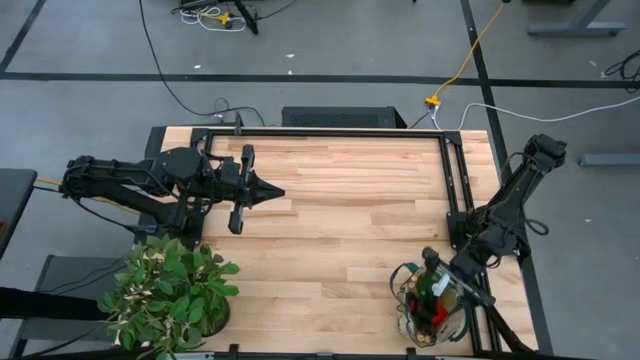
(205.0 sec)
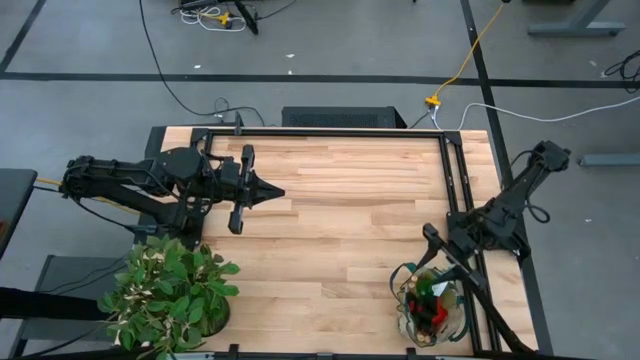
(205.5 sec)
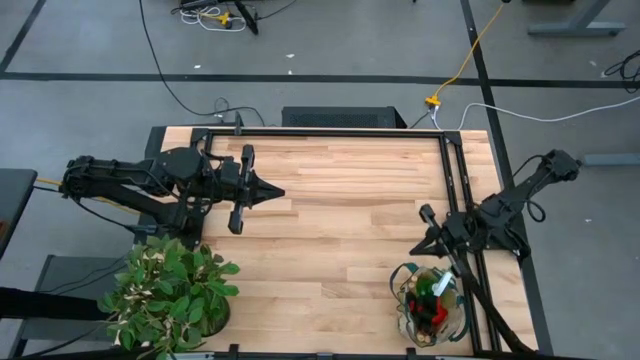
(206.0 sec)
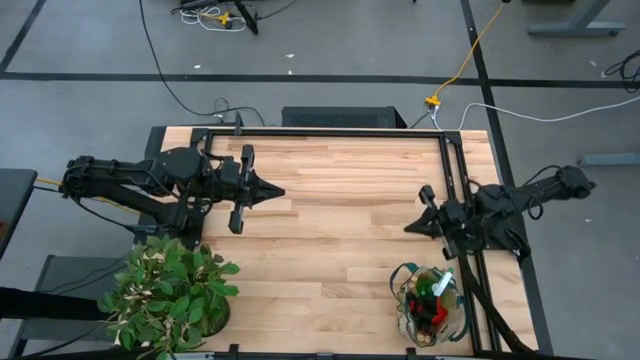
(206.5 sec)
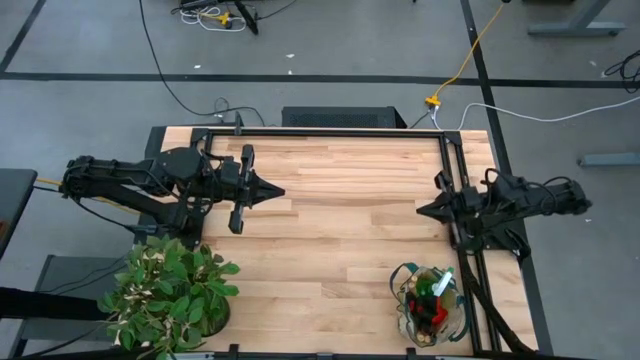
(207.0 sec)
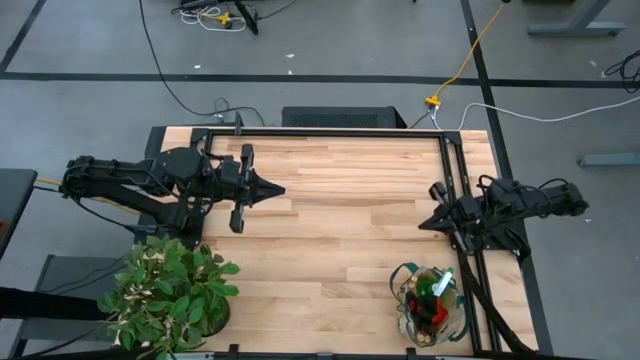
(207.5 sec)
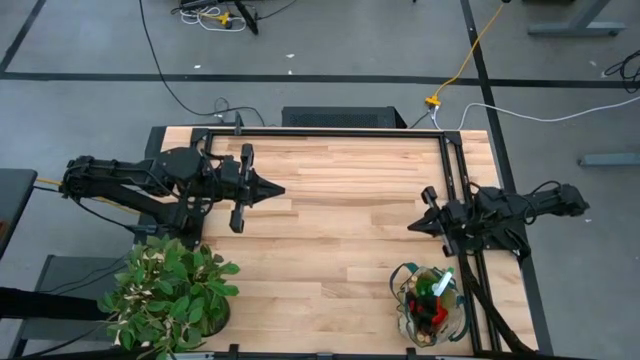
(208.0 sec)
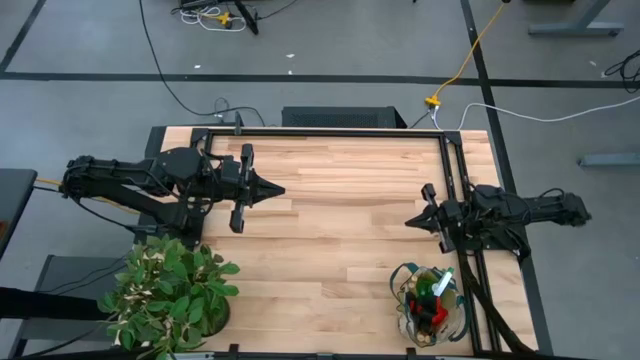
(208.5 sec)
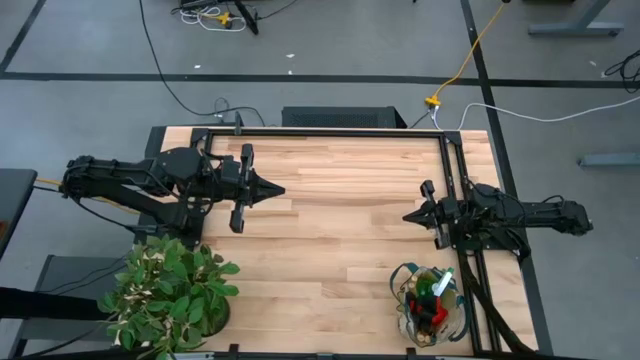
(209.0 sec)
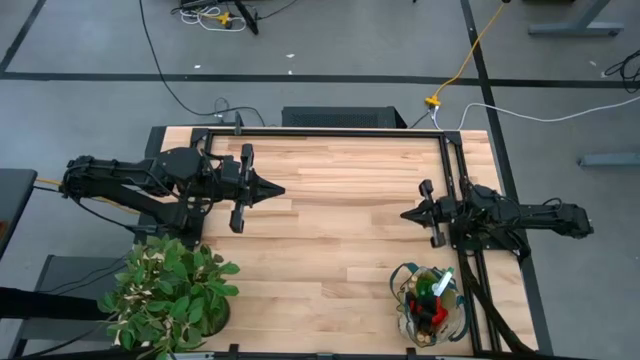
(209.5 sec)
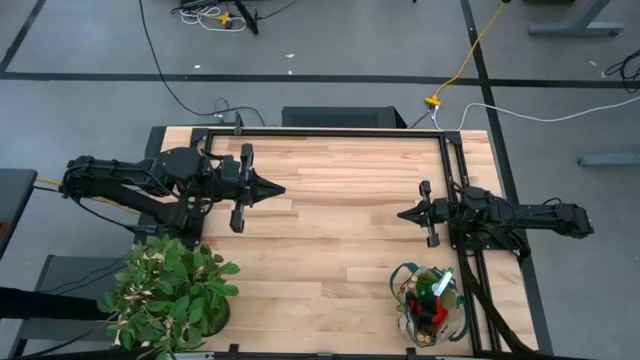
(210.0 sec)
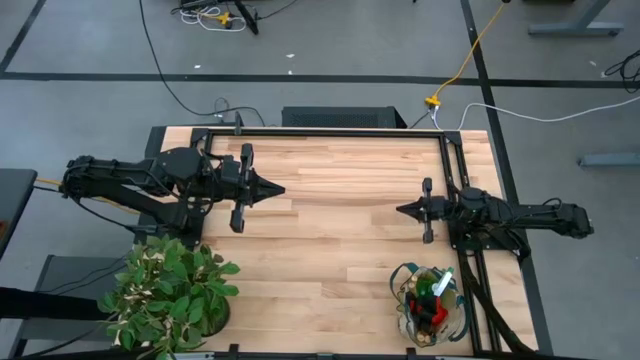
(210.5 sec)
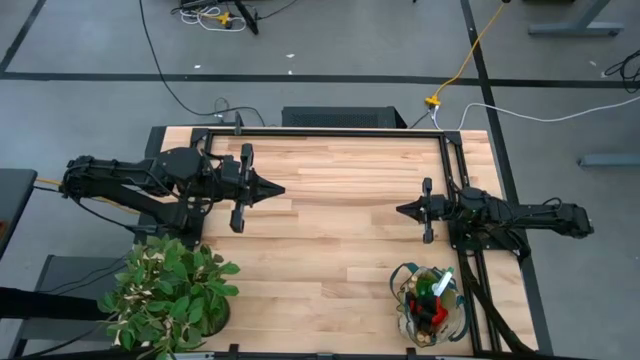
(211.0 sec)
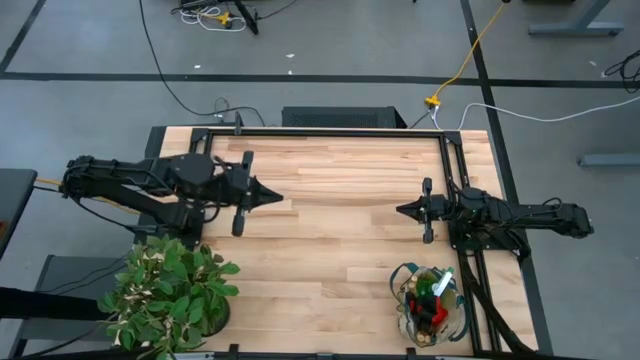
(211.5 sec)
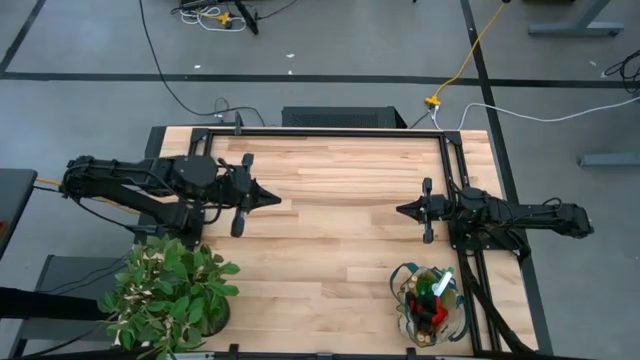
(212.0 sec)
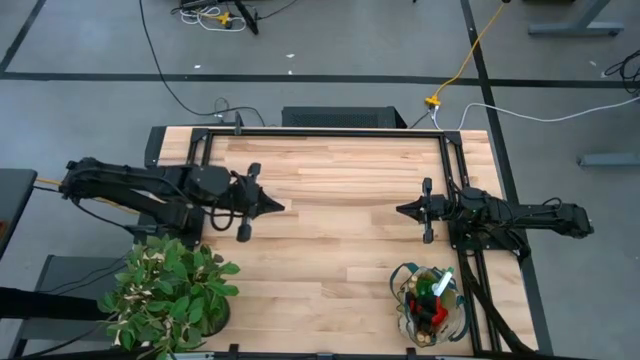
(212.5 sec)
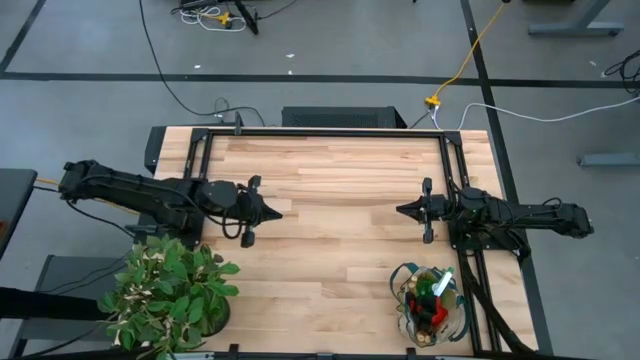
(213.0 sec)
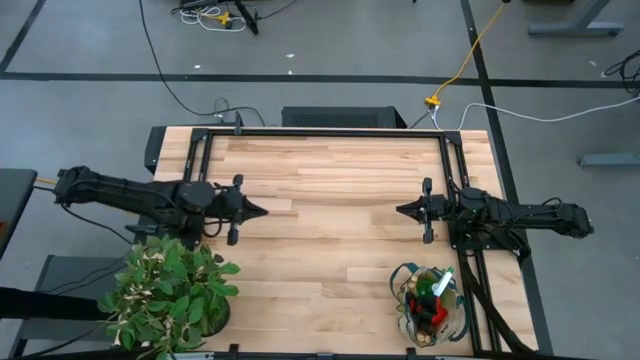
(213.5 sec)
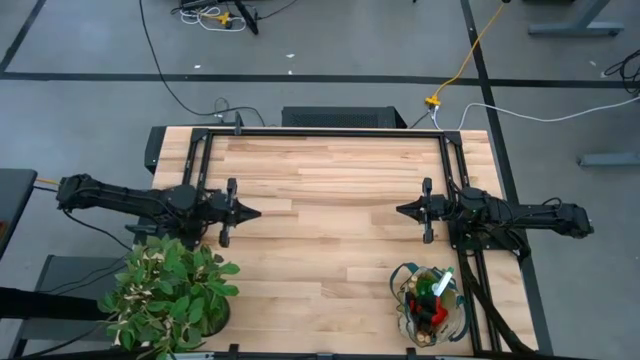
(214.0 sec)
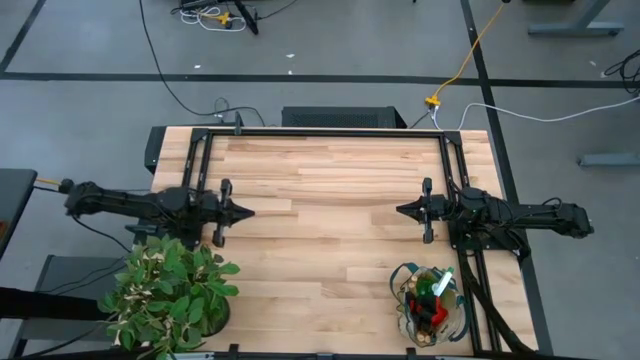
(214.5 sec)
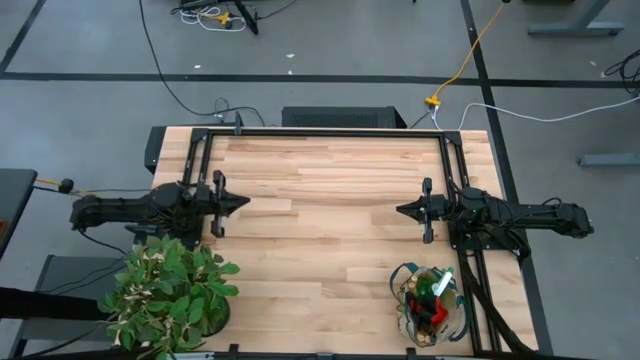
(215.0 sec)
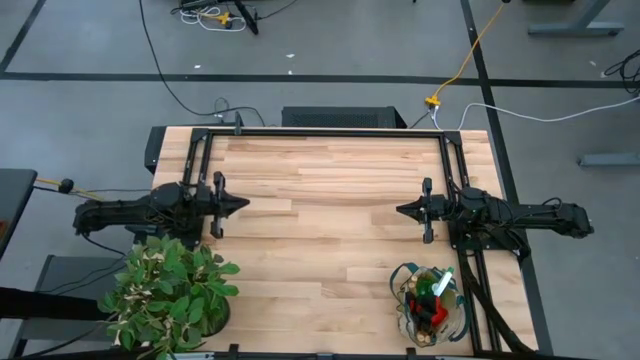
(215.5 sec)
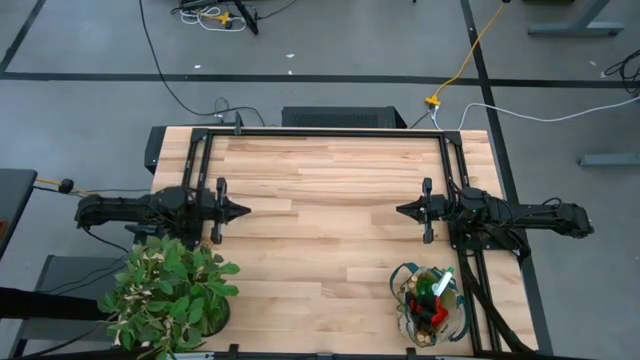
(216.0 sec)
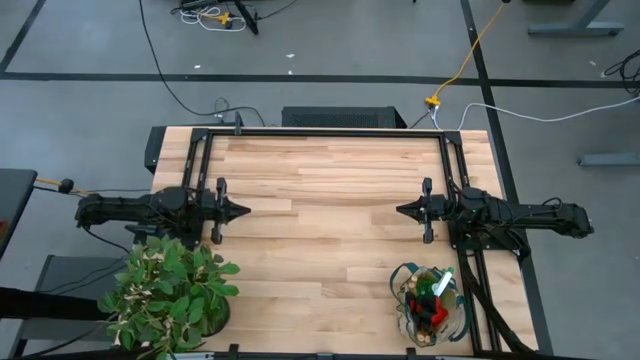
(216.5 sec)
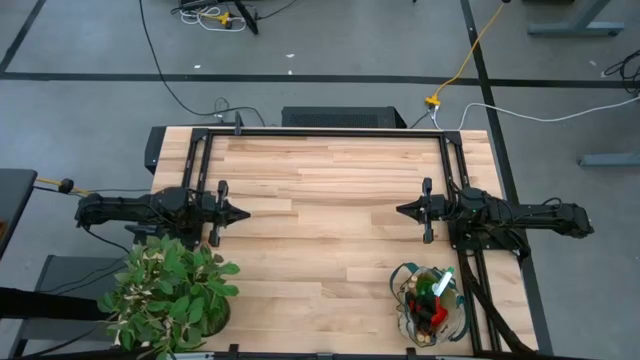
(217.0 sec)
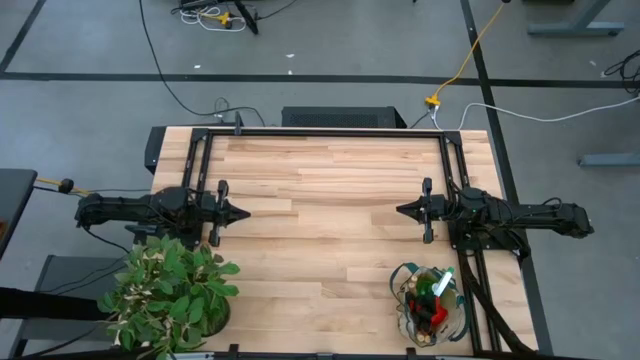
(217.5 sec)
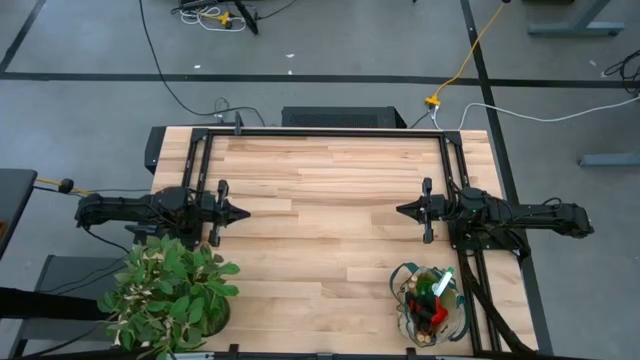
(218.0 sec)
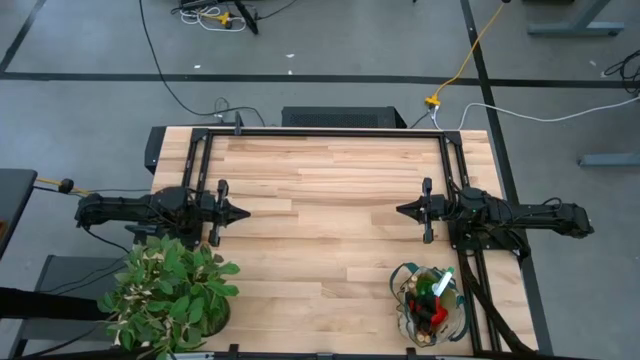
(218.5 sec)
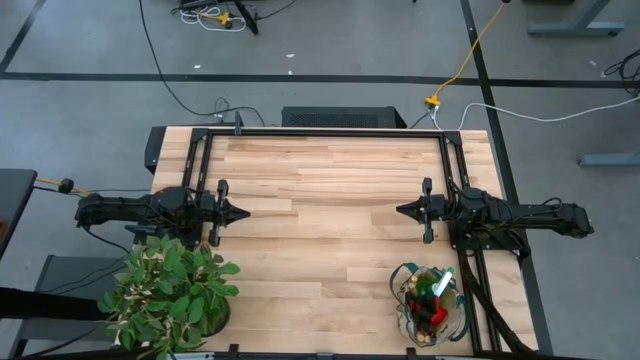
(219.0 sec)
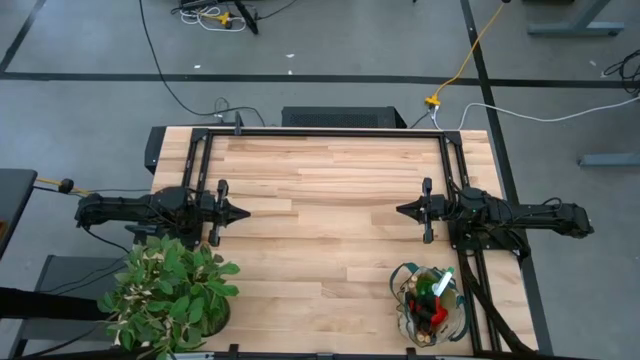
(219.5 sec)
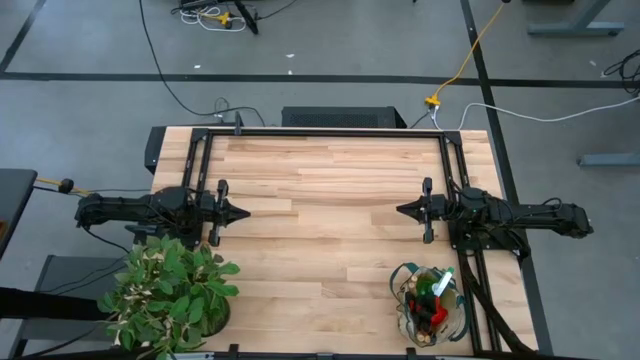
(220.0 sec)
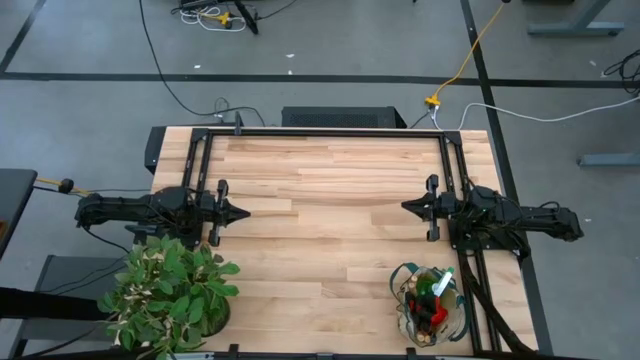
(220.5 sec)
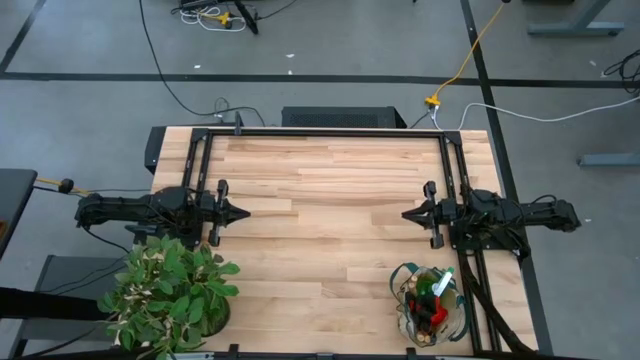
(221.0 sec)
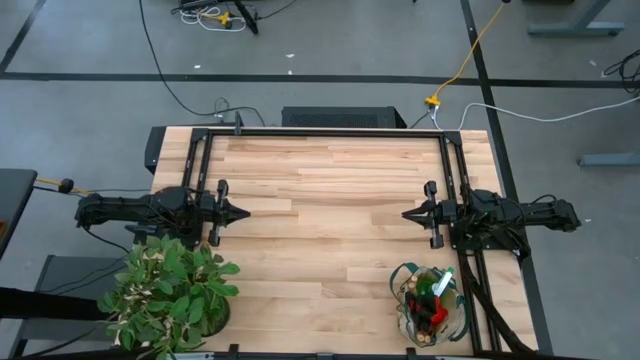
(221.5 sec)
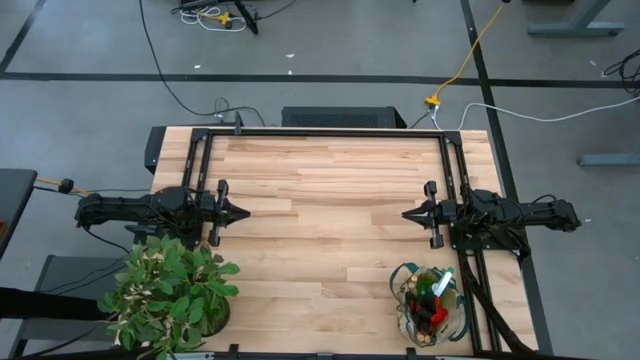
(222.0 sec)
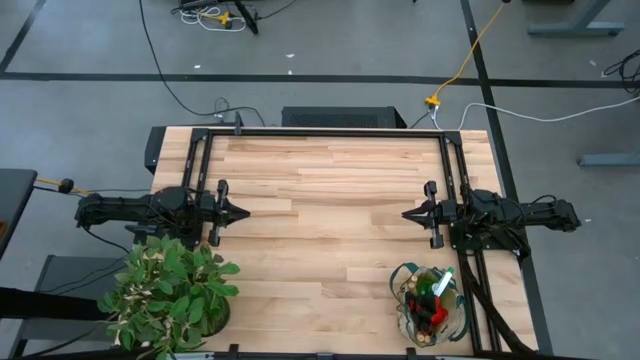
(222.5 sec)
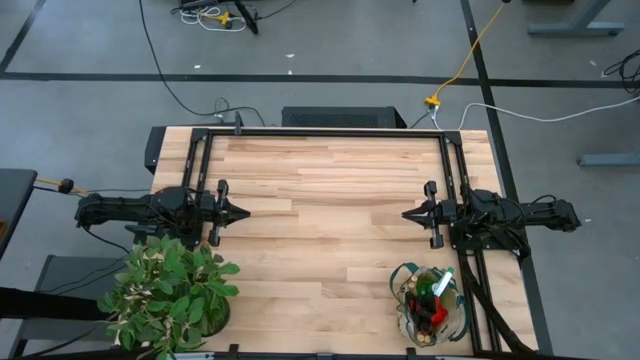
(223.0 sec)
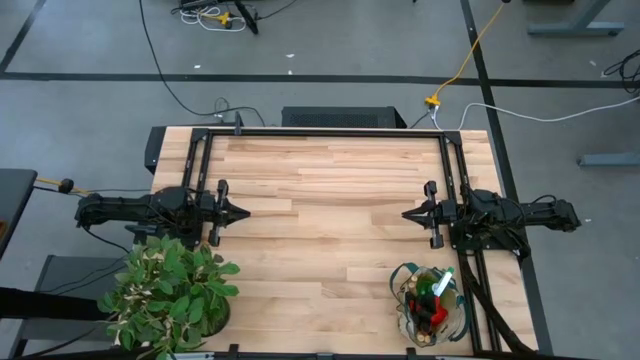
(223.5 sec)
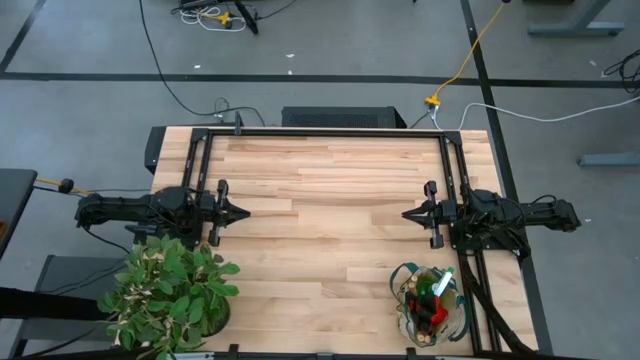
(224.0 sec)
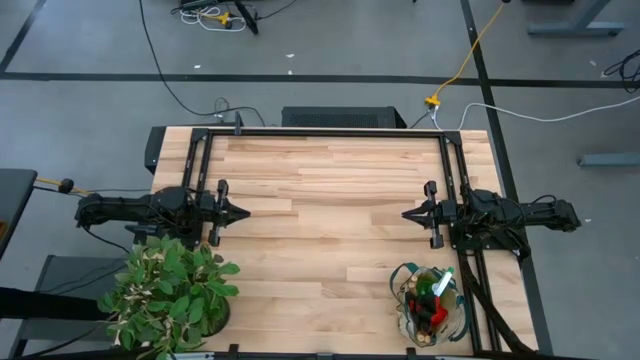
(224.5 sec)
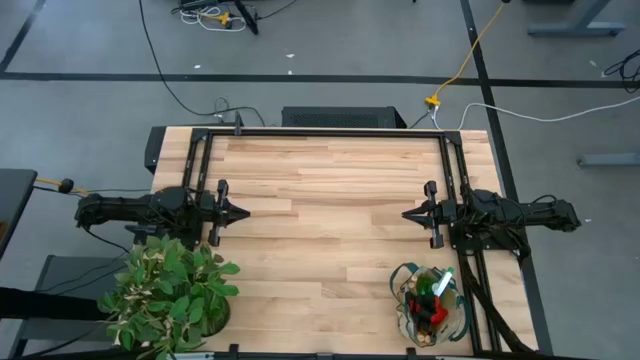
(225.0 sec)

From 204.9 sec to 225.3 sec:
Task: Pick & Place Garden tools in Gardening bag
Return to Home Position
